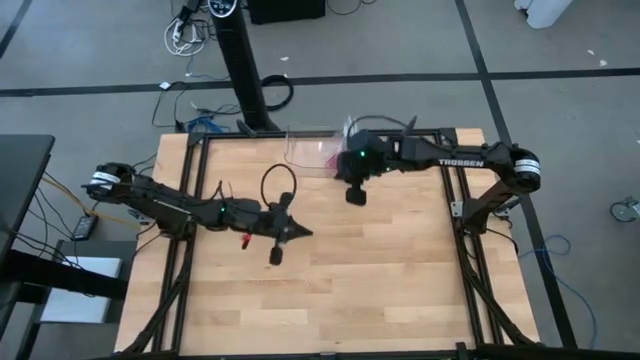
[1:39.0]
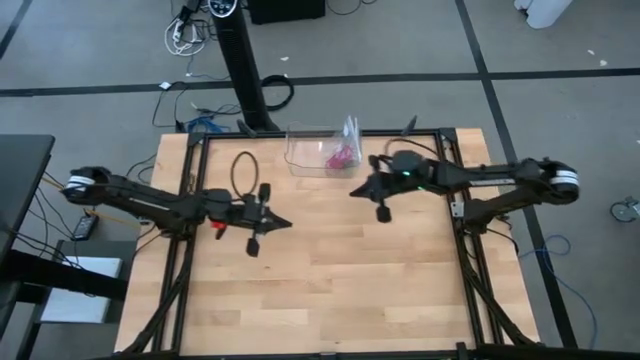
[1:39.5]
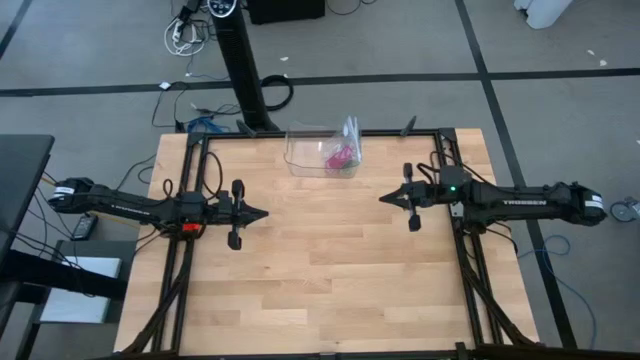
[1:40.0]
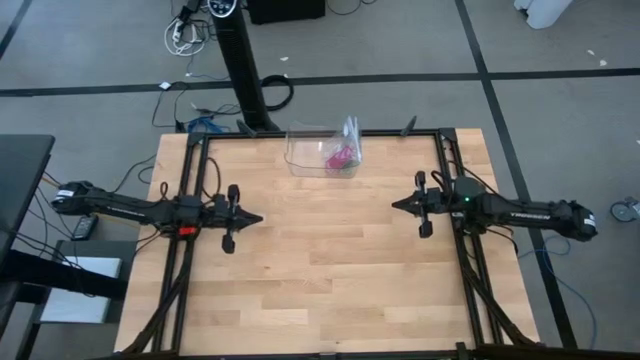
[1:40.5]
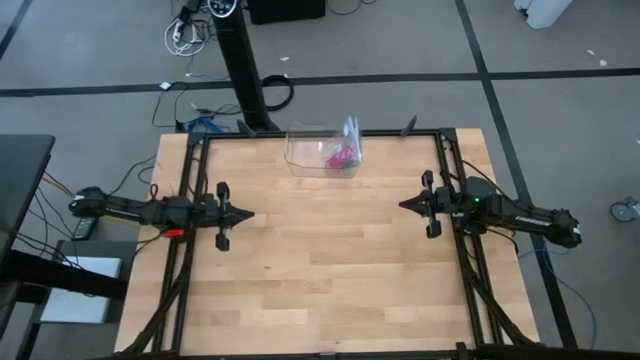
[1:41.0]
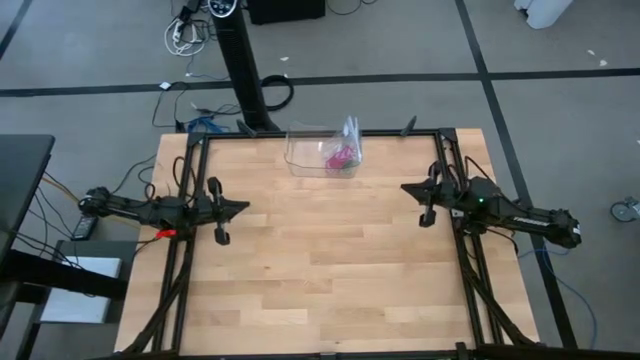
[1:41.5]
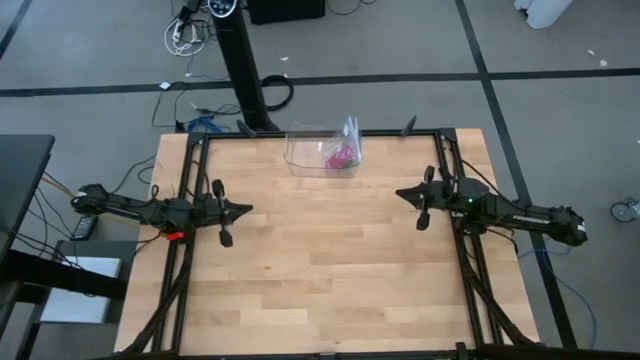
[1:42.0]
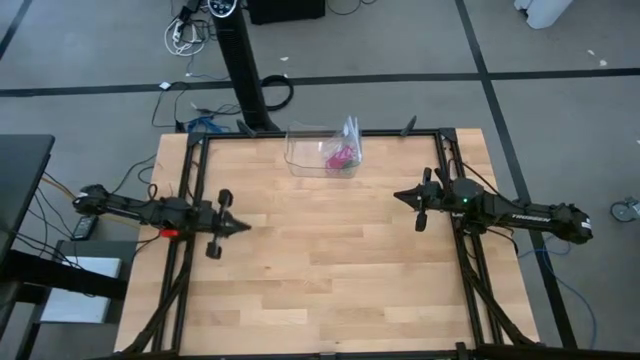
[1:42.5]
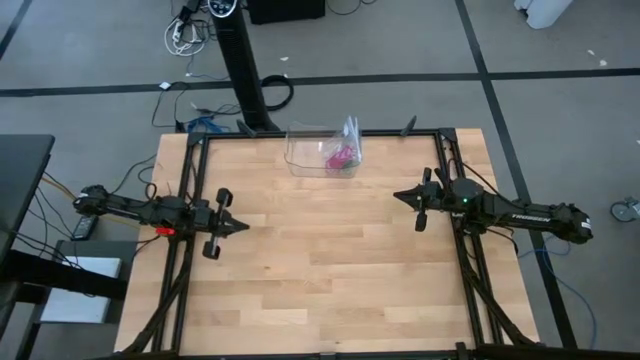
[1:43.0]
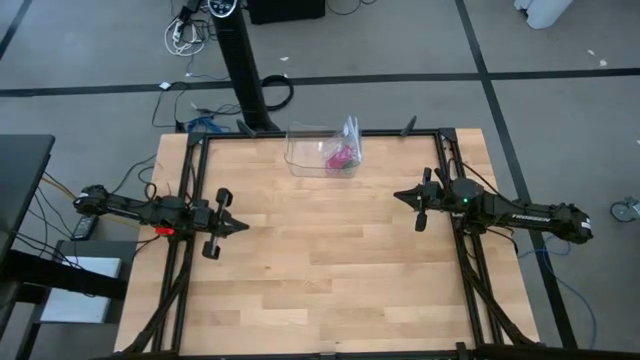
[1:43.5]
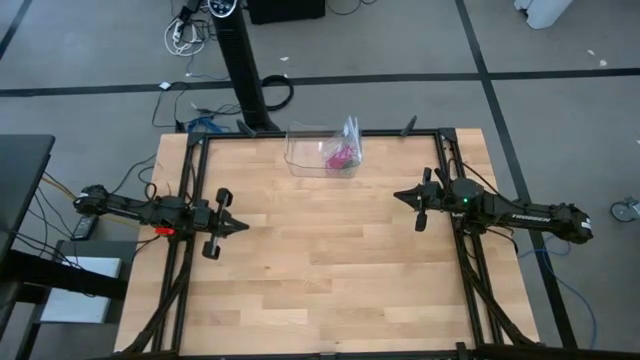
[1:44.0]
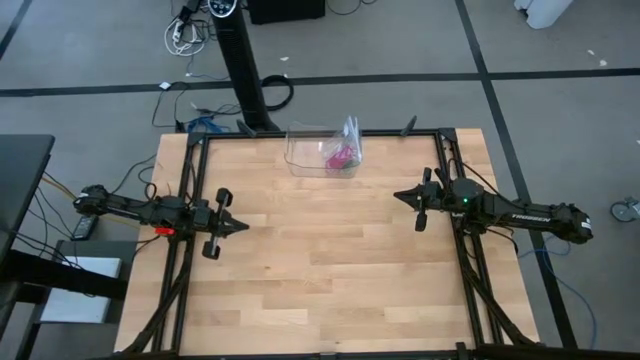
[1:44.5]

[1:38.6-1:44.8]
Task: Roll bandage
Return to Home Position

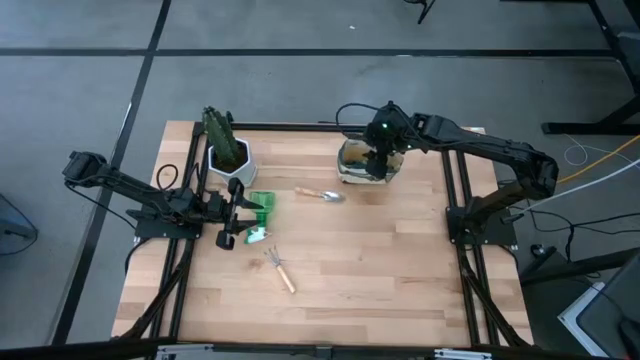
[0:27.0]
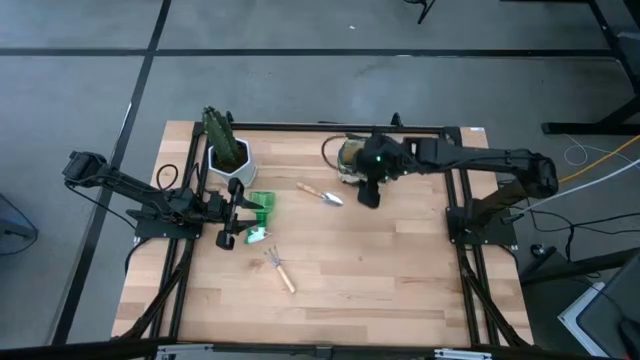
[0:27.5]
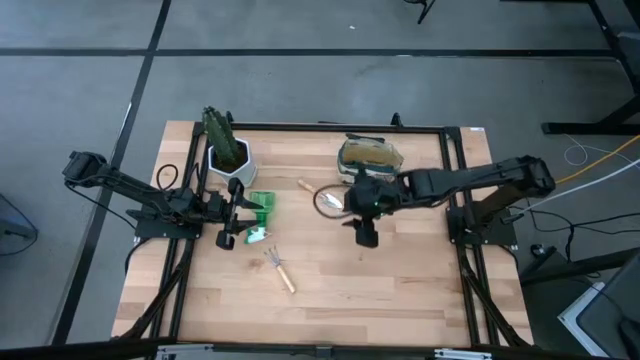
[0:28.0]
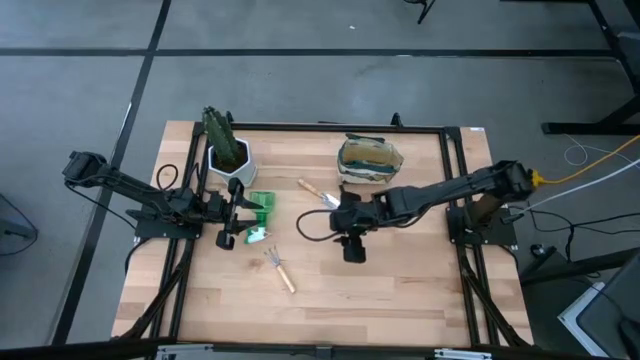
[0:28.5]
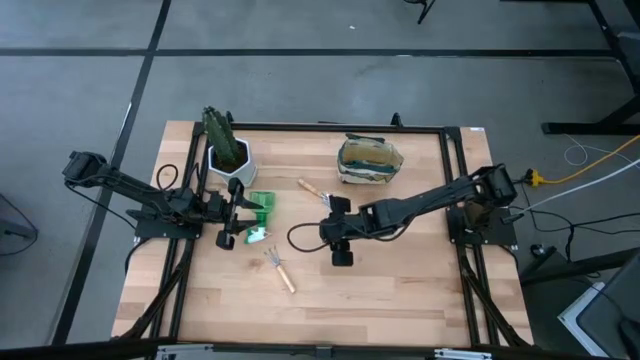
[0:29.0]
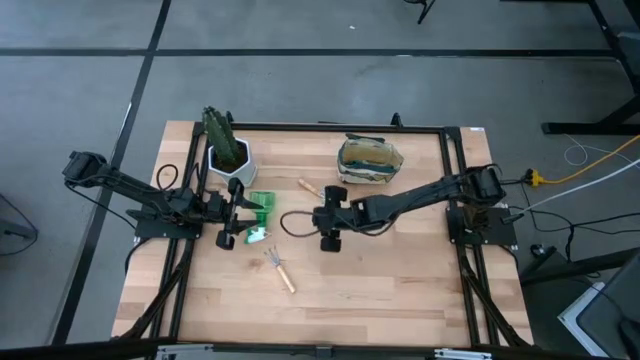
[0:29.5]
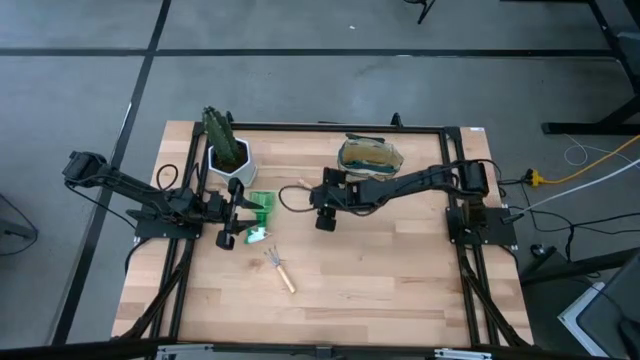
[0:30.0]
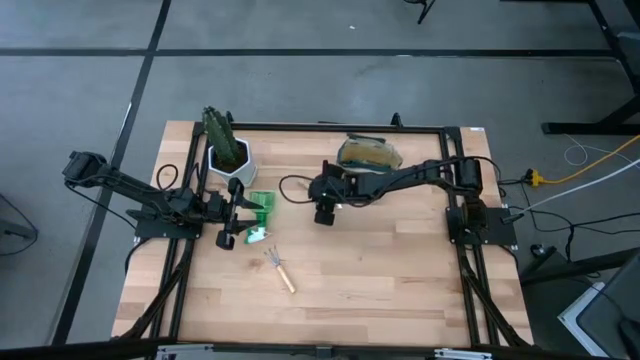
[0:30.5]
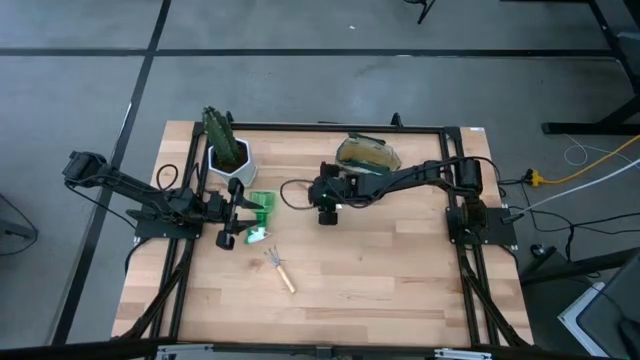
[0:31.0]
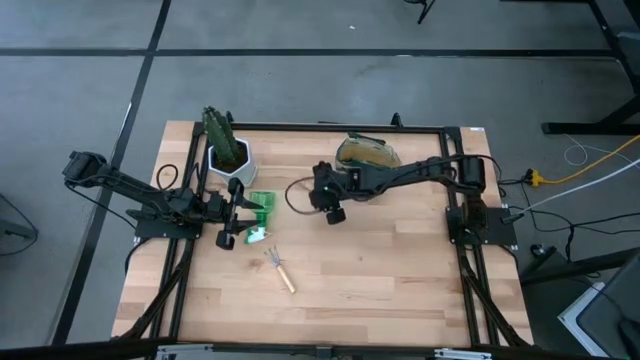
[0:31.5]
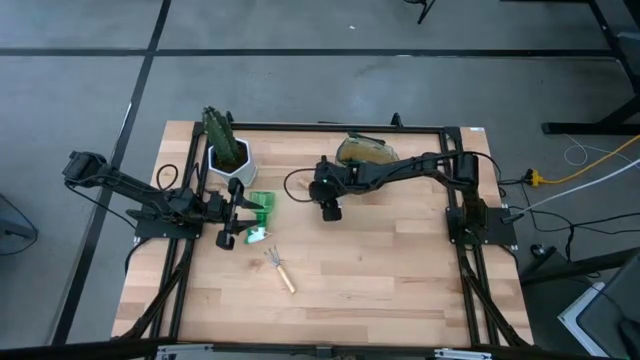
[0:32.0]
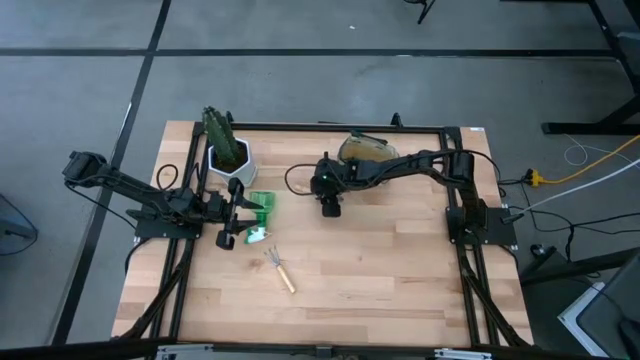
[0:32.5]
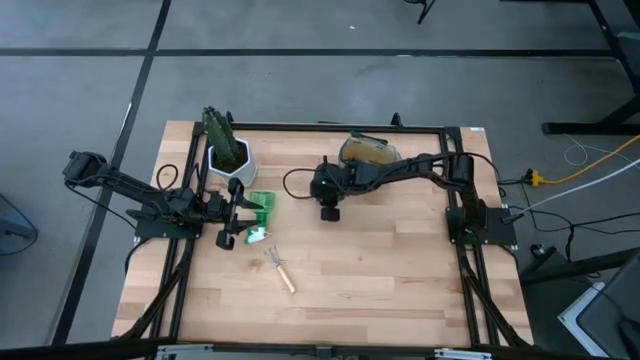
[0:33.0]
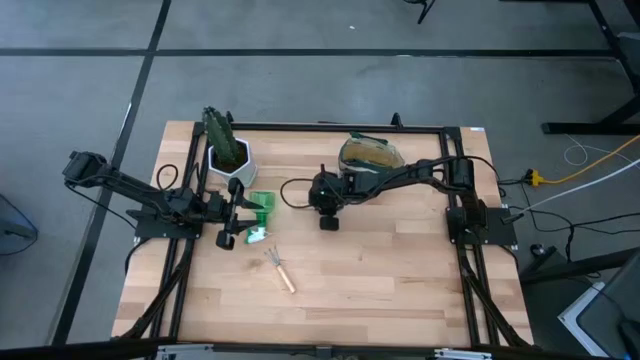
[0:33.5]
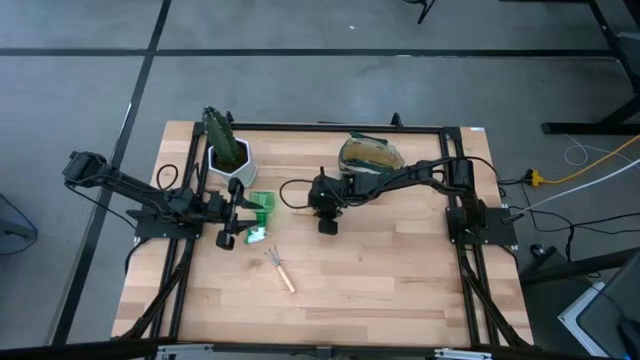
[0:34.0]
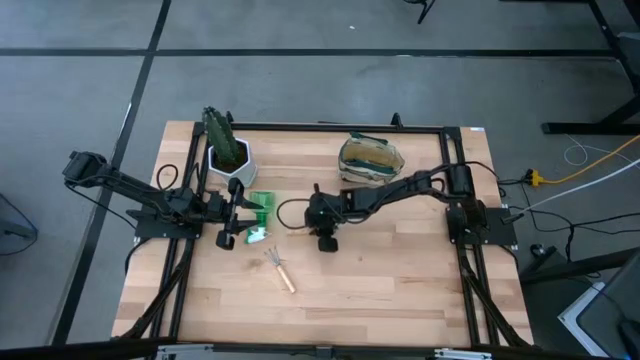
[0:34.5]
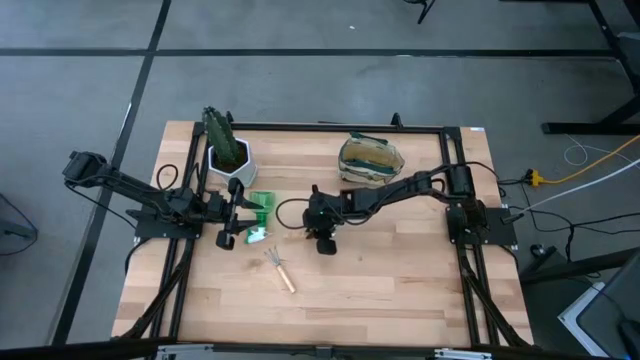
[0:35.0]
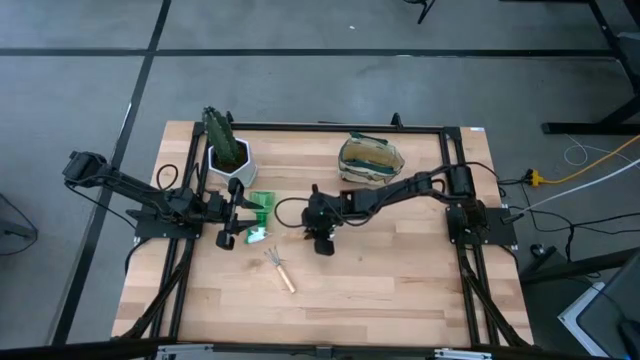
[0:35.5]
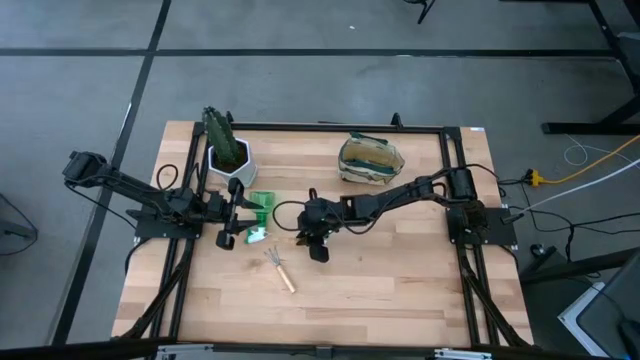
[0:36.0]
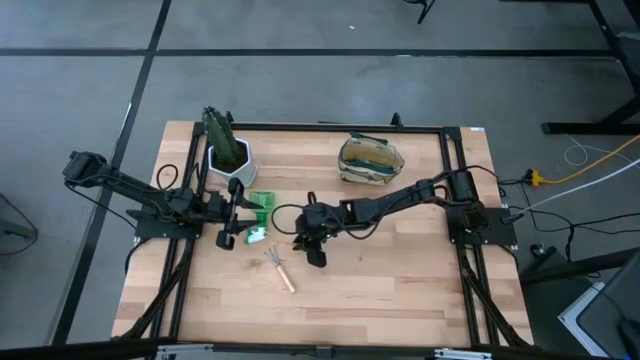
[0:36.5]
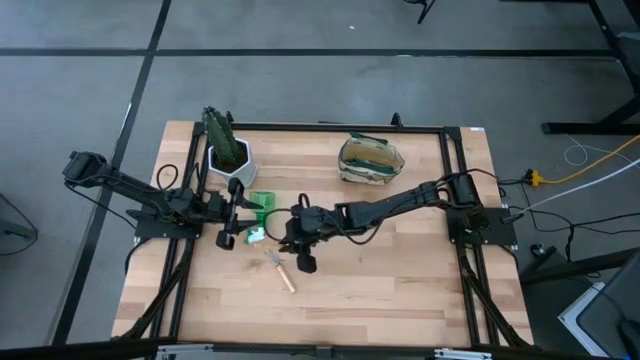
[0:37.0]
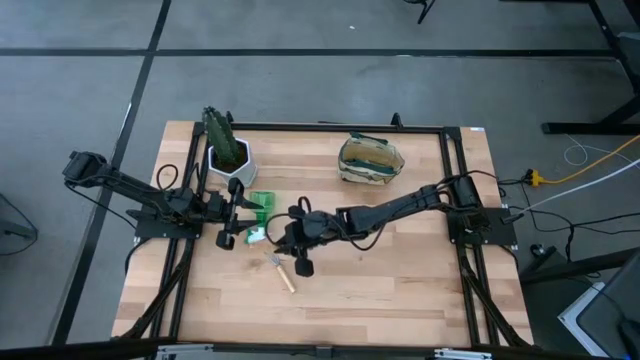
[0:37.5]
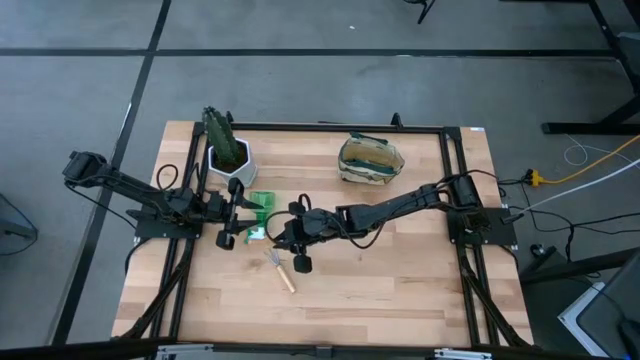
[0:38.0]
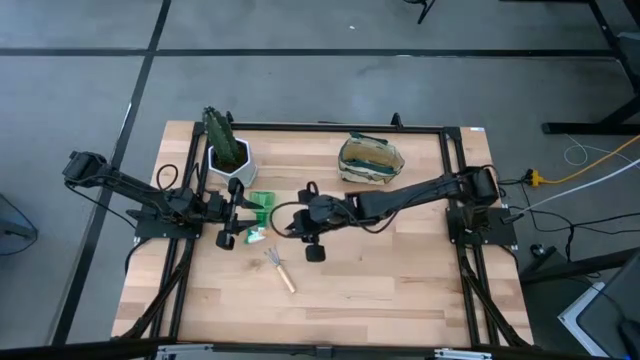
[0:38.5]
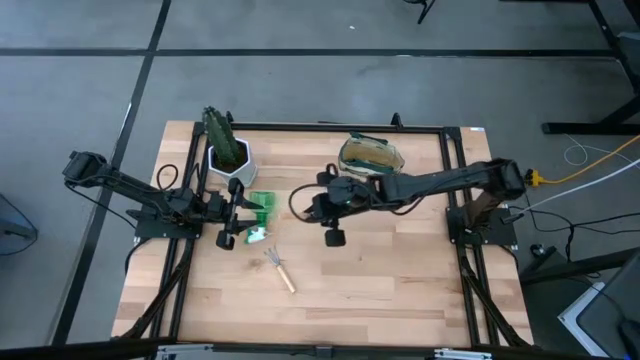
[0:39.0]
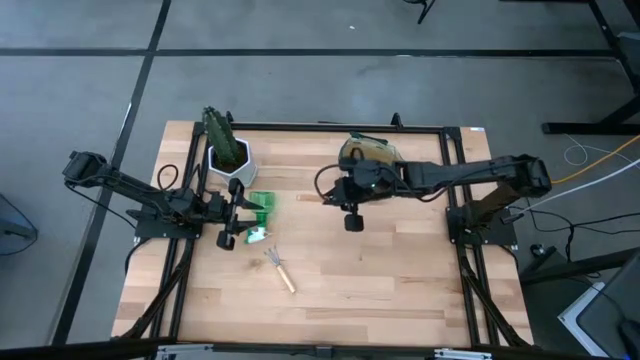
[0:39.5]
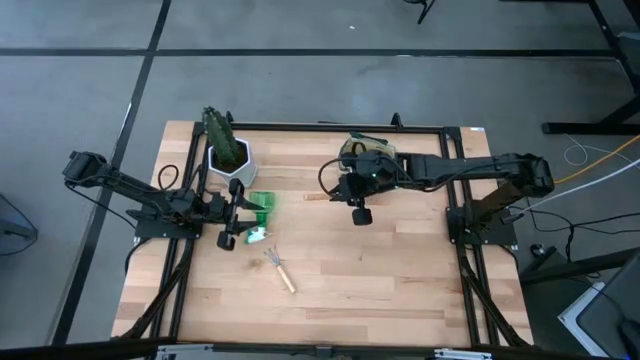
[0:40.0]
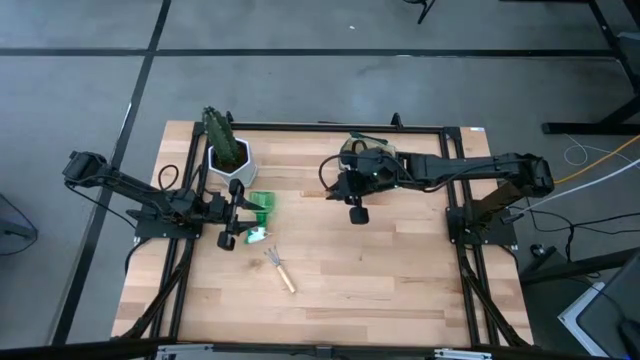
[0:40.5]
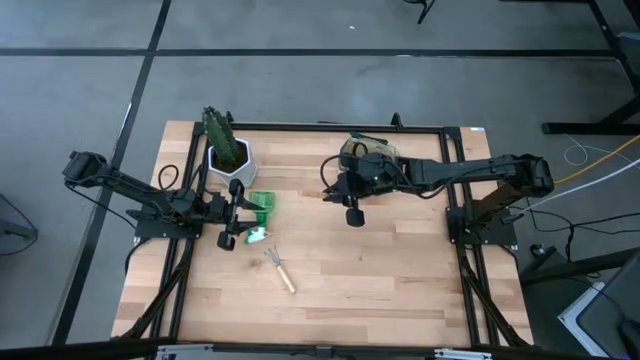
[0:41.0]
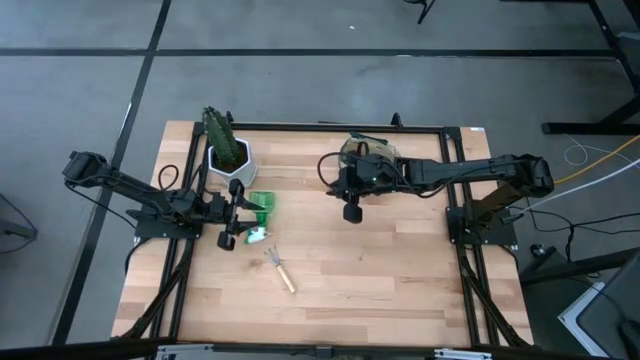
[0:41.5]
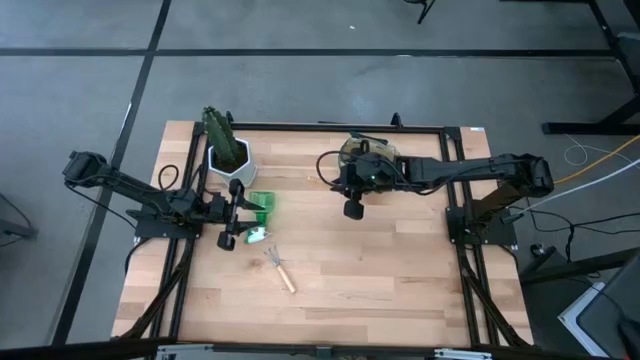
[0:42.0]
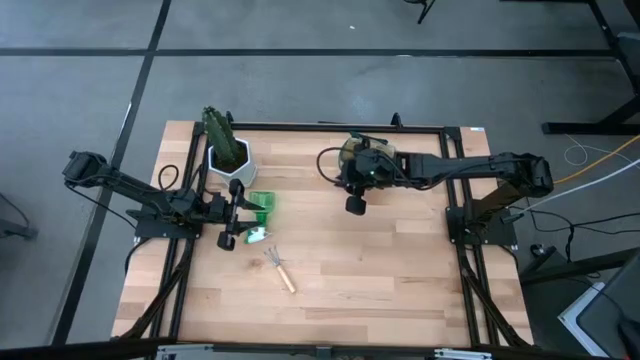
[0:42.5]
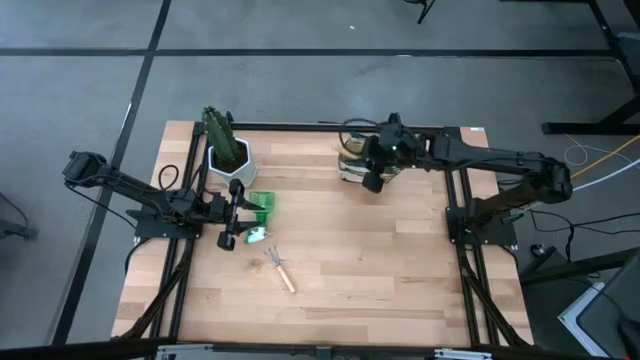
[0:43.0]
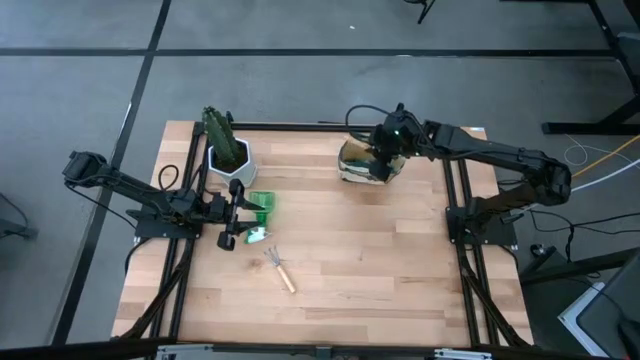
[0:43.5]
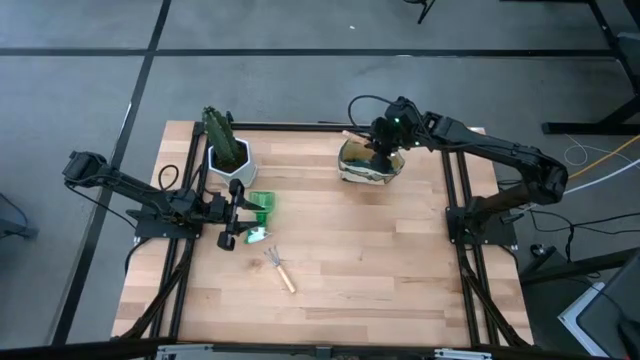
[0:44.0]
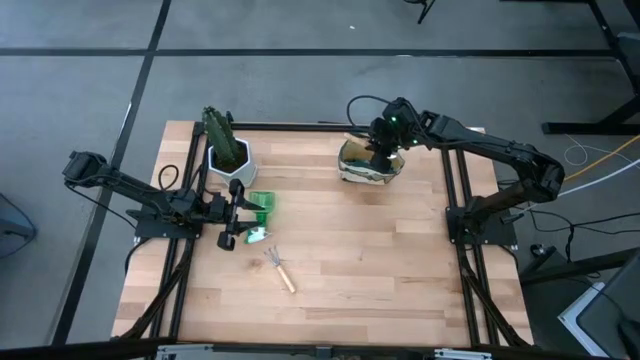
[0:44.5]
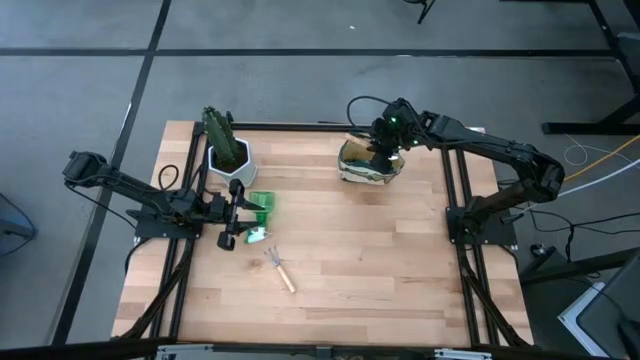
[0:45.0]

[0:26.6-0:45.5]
Task: Pick & Place Garden tools in Gardening bag
Put the brown trowel into the brown gardening bag
